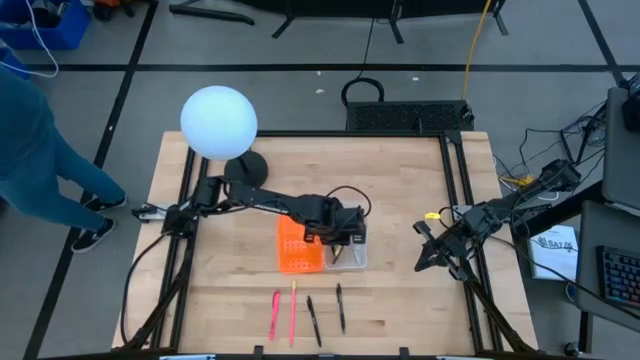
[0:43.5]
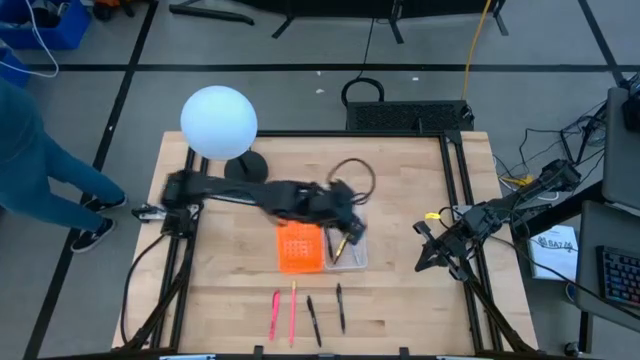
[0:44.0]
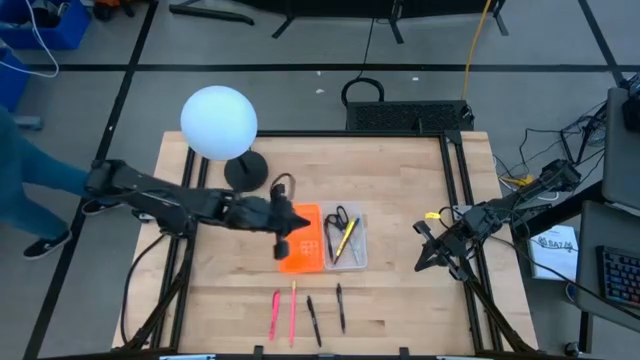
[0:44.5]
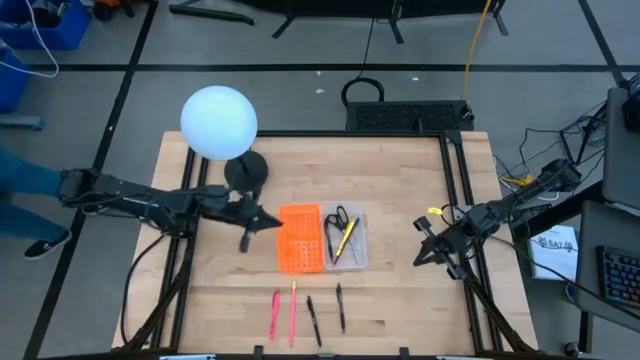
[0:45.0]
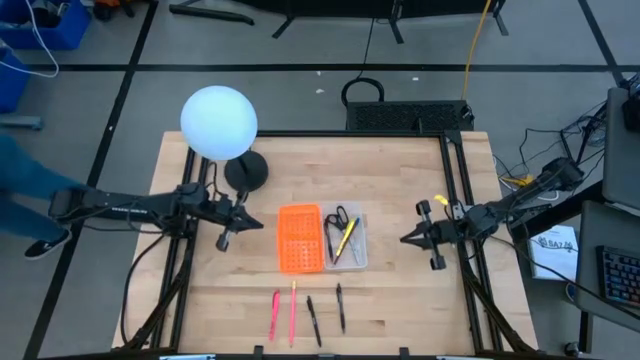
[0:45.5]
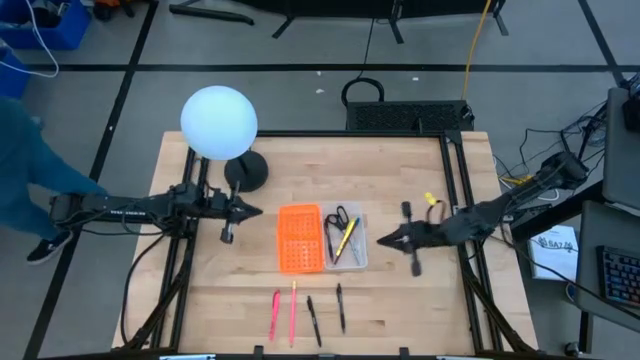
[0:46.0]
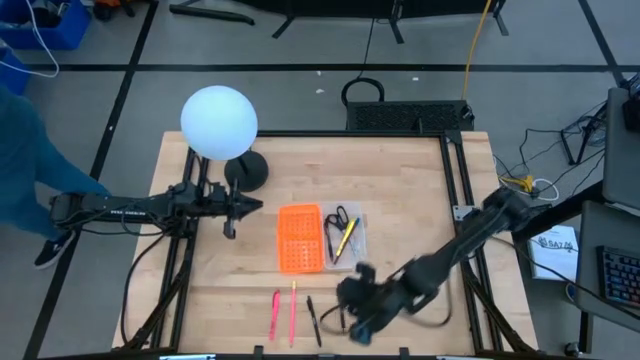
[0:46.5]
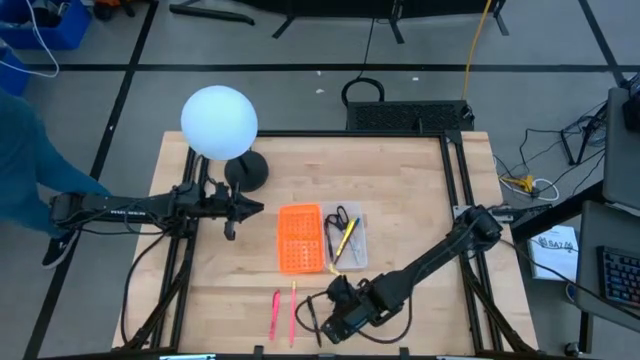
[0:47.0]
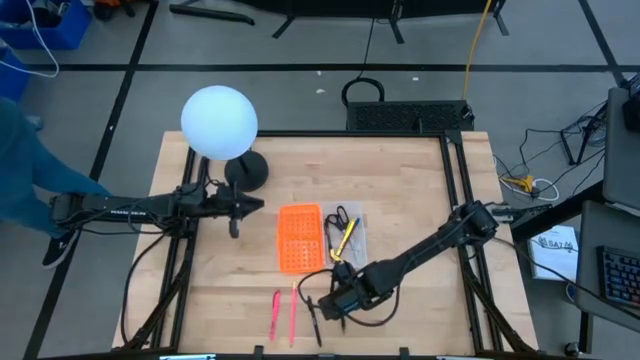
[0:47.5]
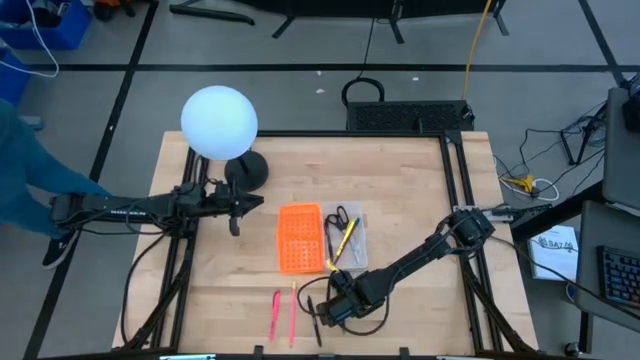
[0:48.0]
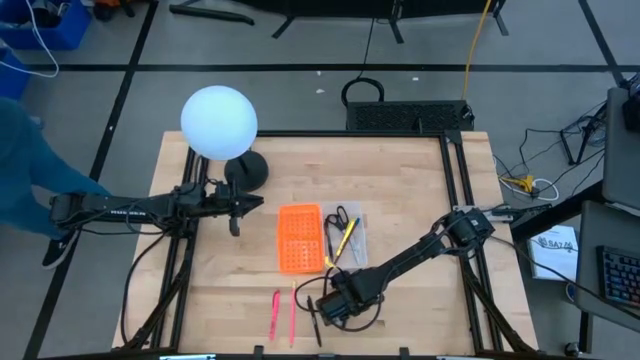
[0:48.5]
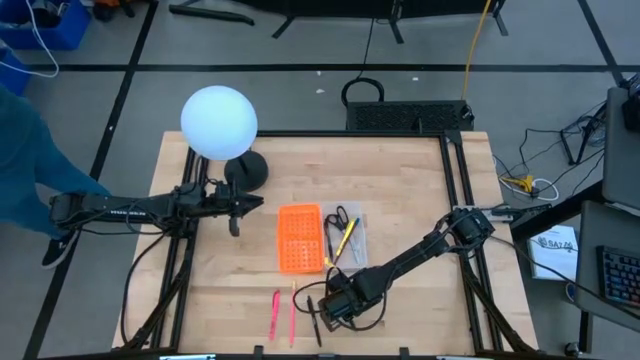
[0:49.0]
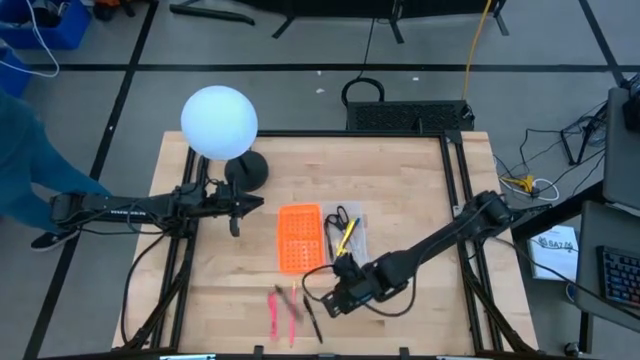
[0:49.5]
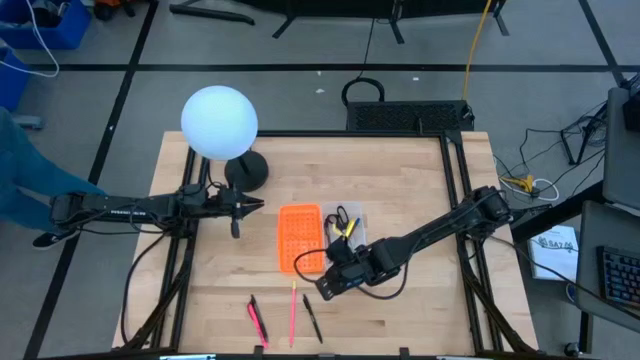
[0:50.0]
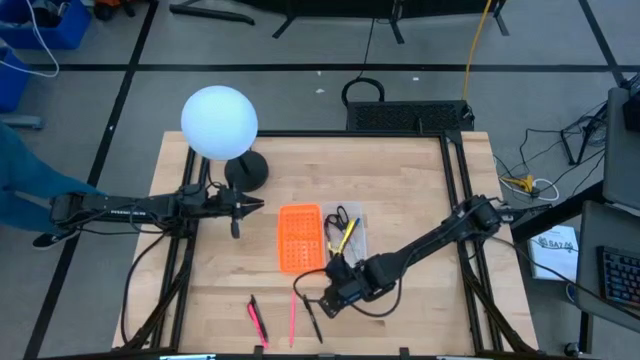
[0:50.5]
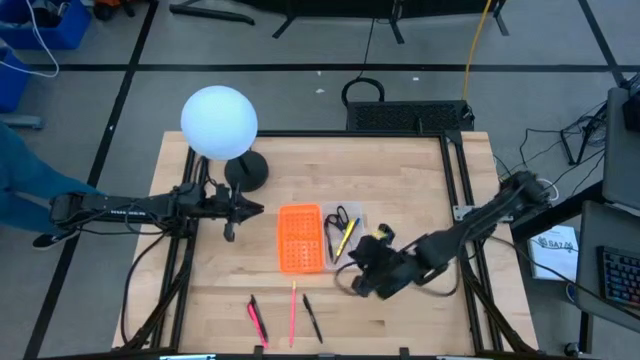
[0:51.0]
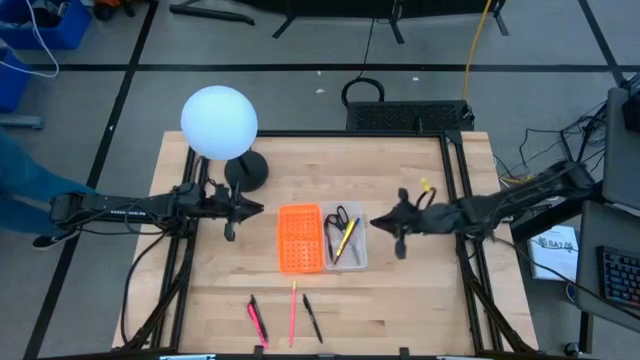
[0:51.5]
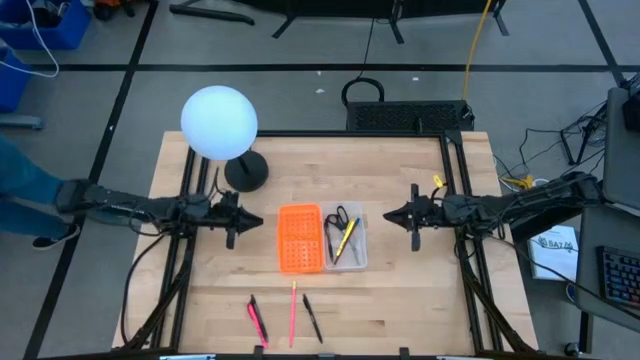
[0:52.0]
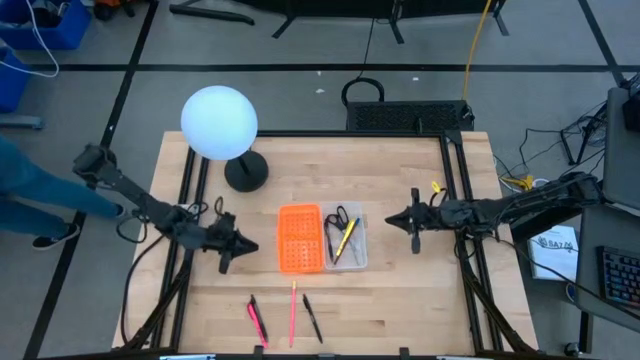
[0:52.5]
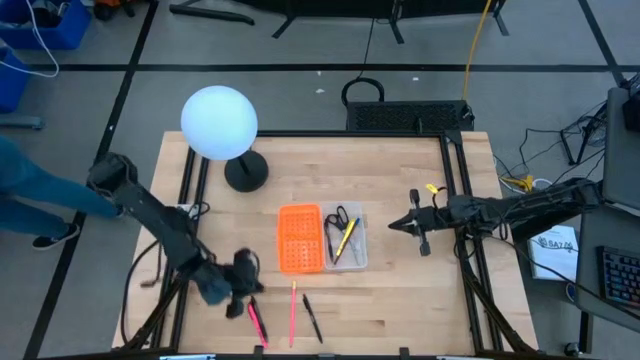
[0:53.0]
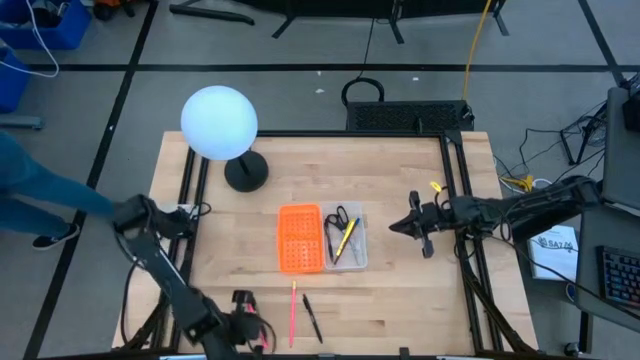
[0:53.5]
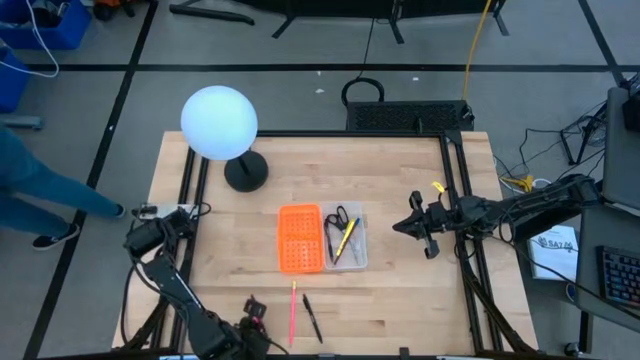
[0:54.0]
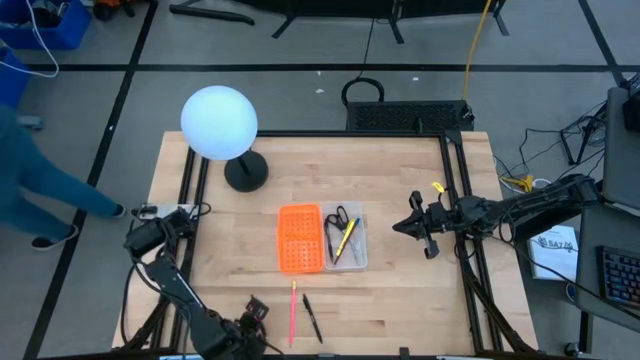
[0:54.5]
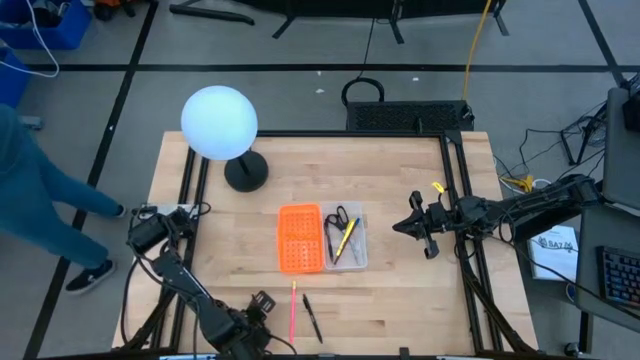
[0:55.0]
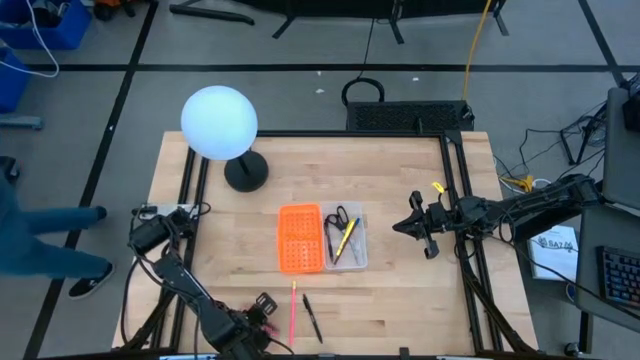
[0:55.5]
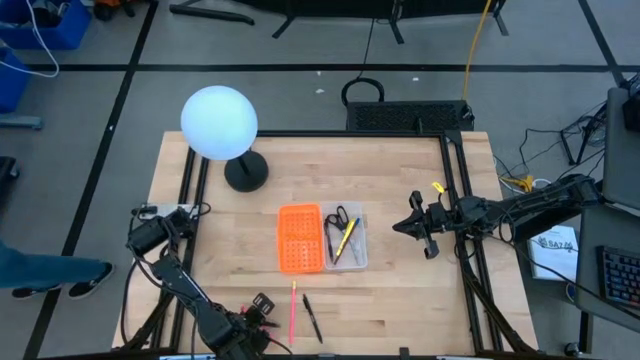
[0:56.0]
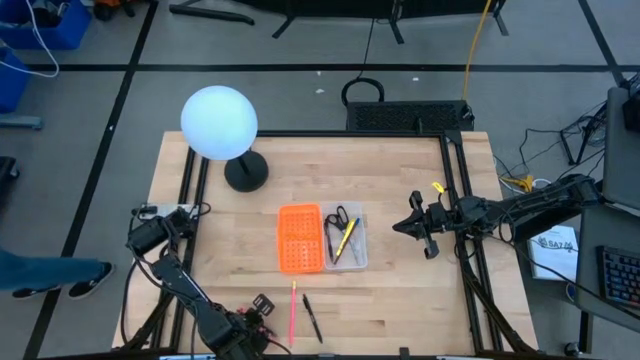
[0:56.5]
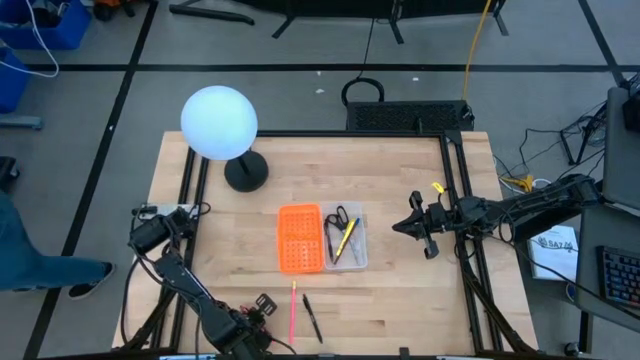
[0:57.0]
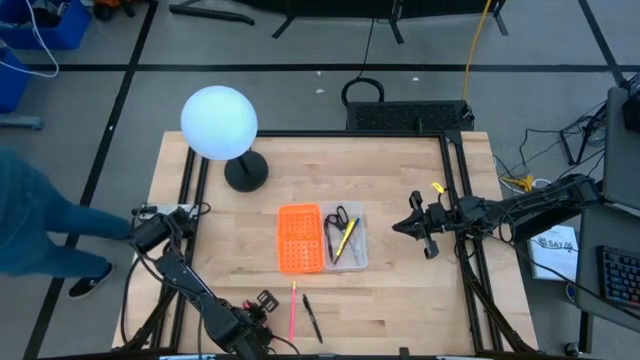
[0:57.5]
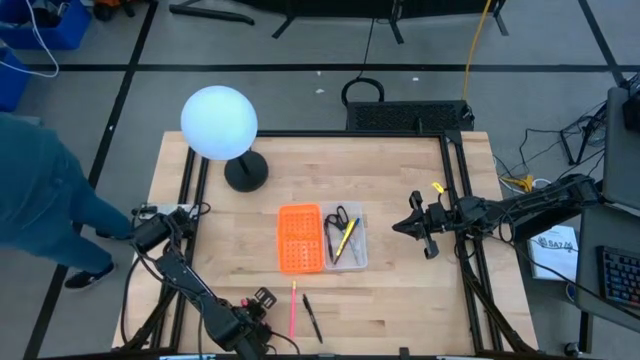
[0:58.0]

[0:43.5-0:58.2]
Task: Pick & place school supplies into a supply box
Put the right black pen into the orange and white supply box

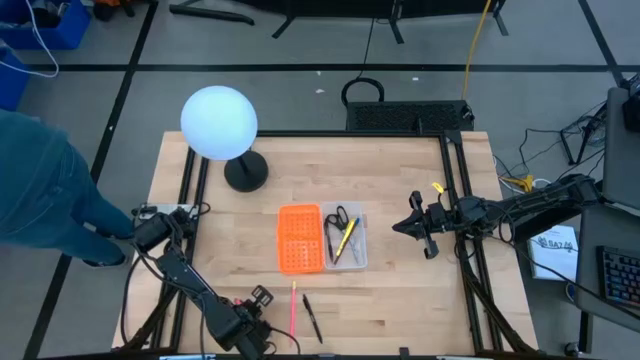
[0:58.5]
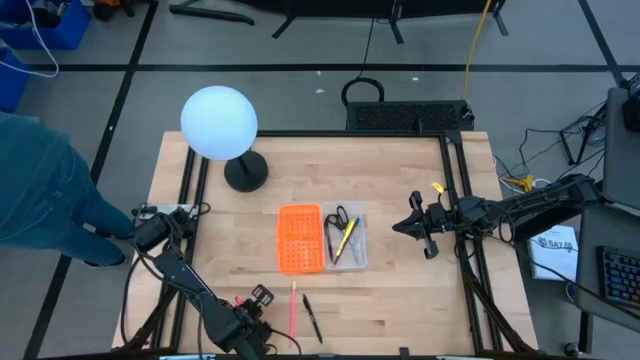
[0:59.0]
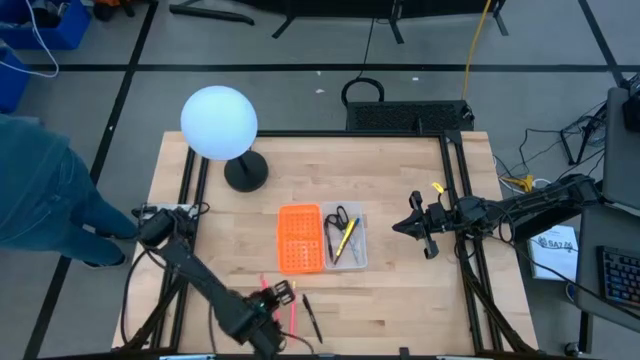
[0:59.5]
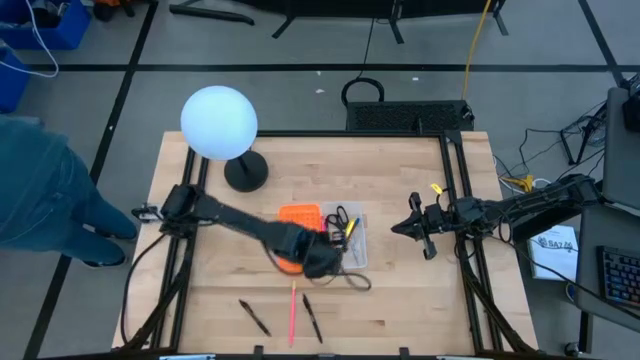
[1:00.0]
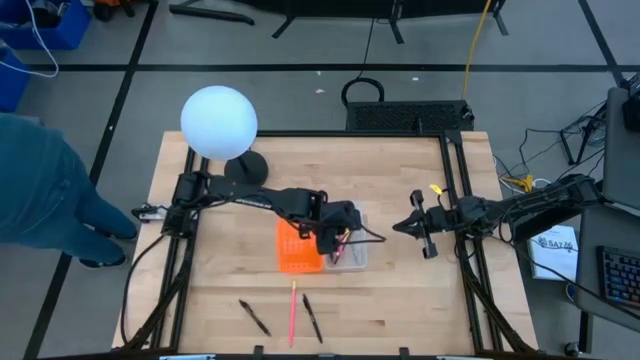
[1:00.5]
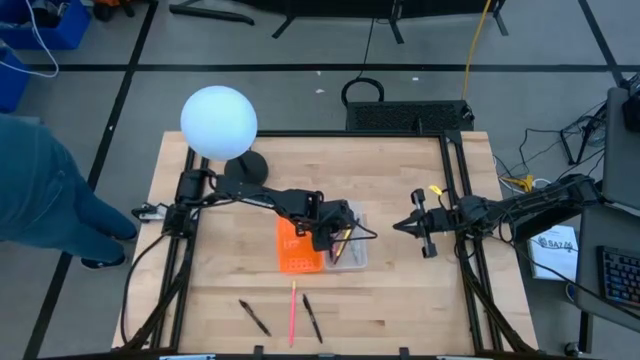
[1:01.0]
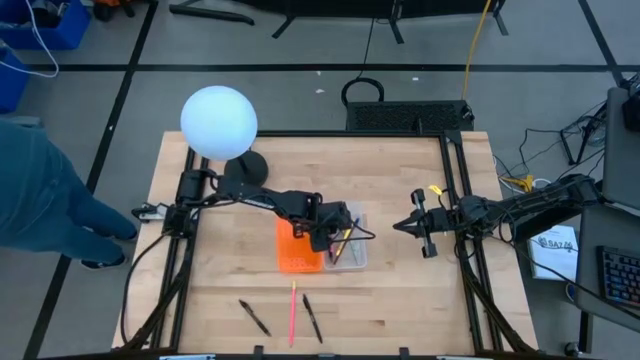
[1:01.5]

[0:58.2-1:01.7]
Put the pink pen into the orange and white supply box

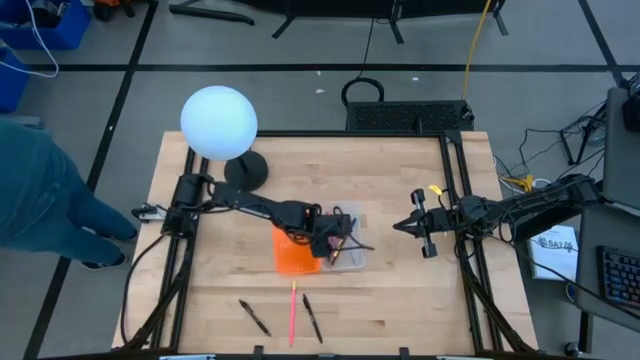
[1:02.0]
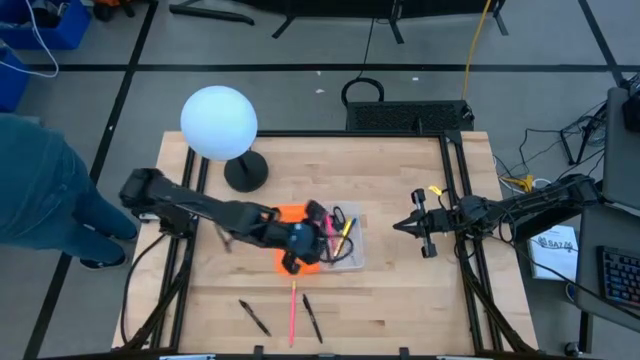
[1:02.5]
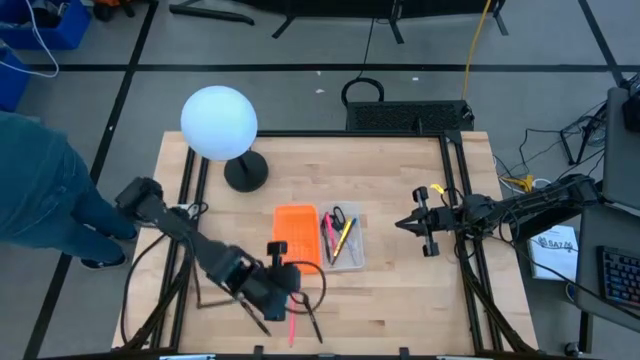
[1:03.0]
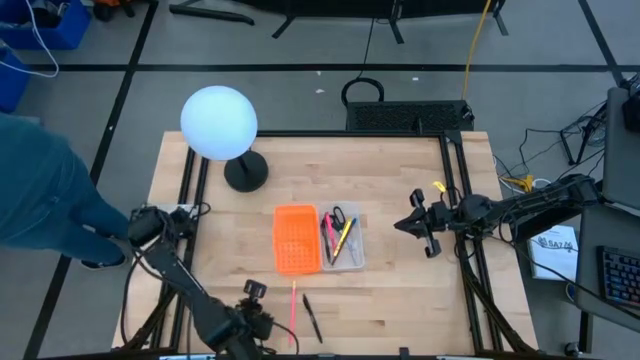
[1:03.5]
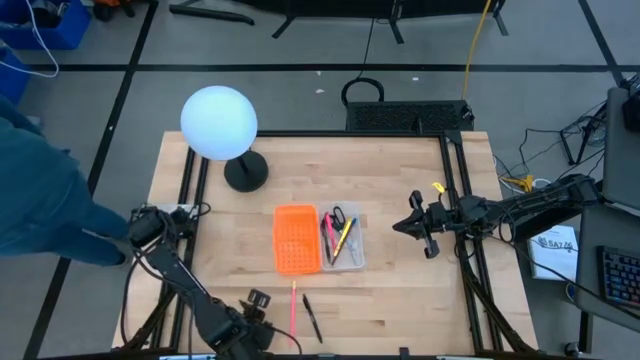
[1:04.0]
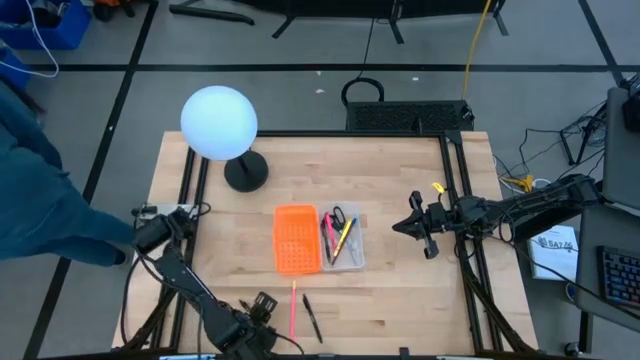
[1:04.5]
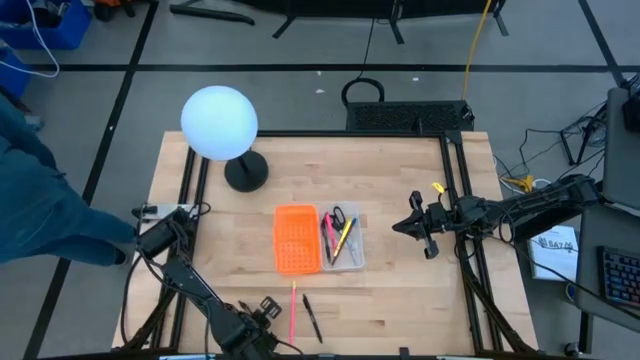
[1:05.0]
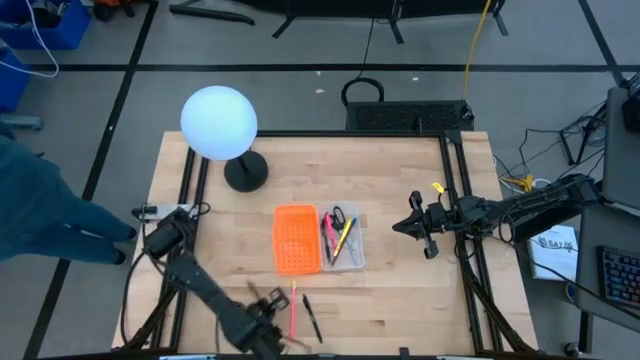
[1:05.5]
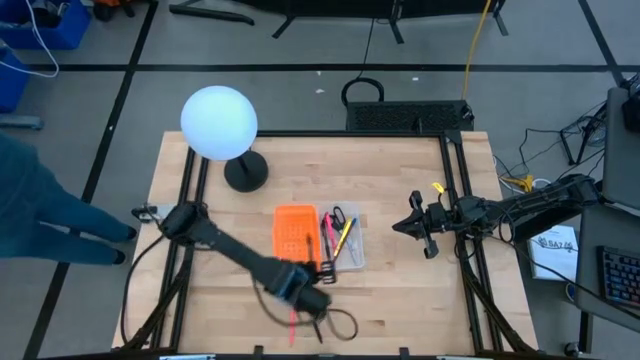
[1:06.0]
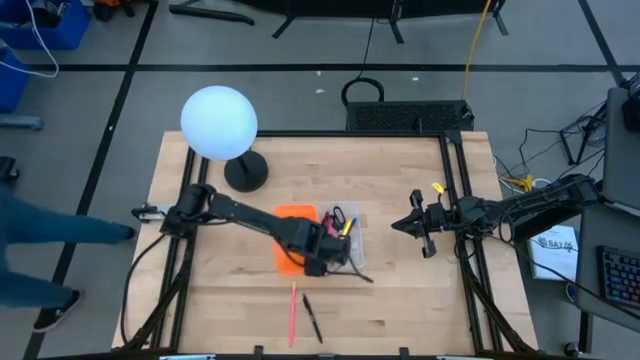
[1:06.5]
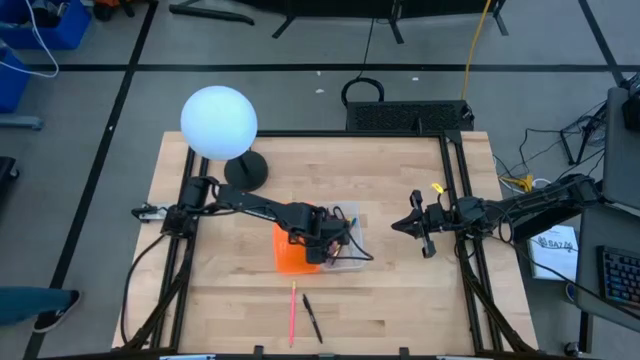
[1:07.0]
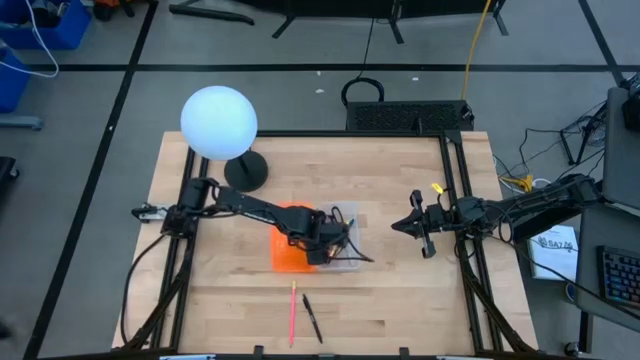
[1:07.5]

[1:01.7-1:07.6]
Put the left black pen into the orange and white supply box
